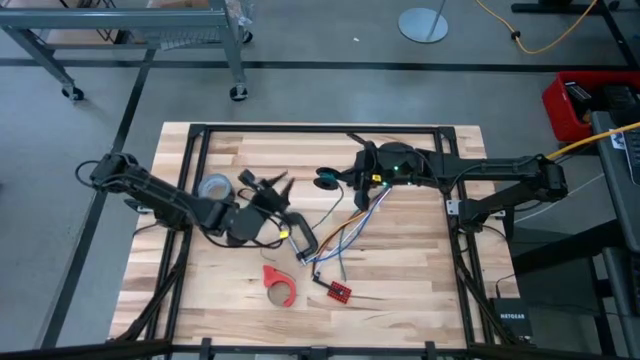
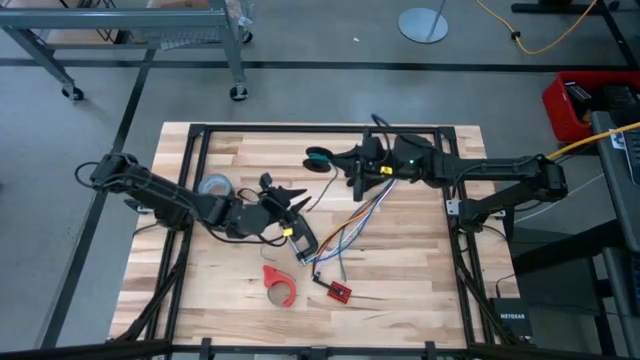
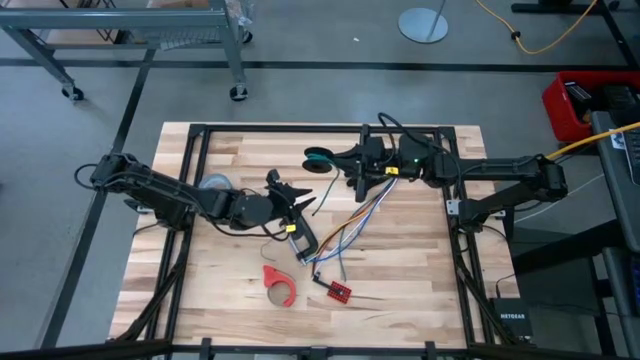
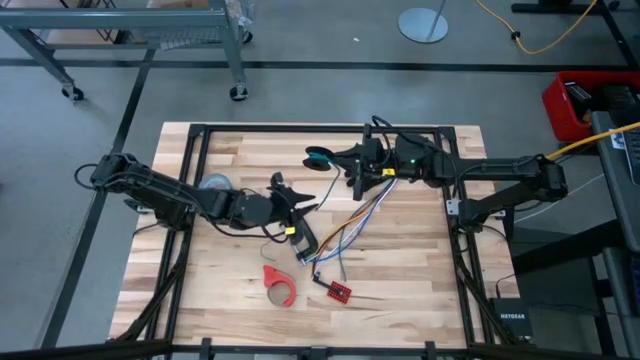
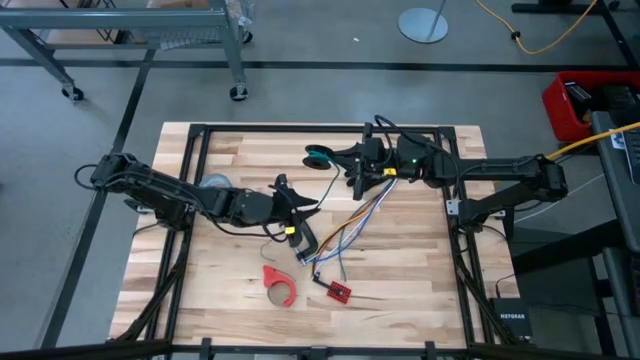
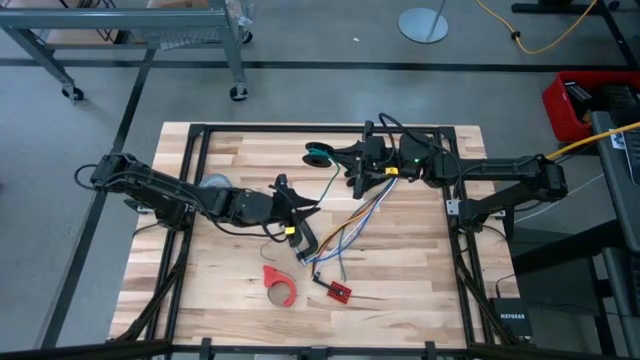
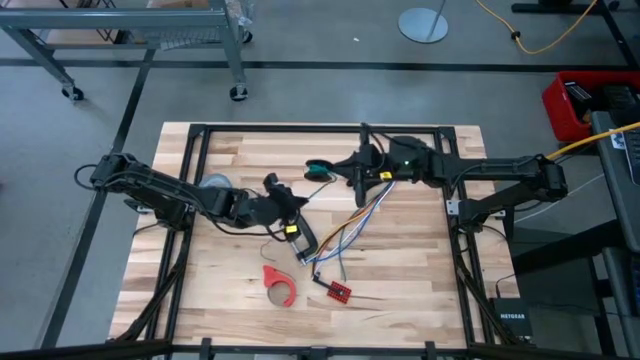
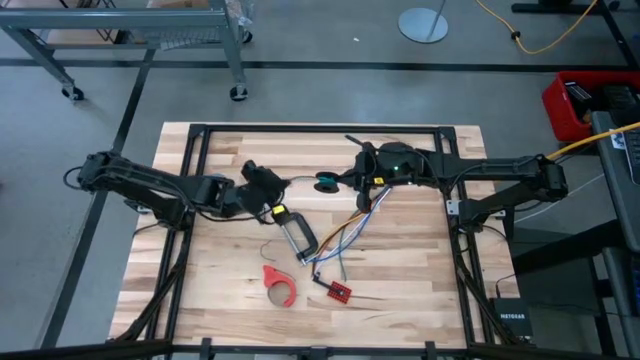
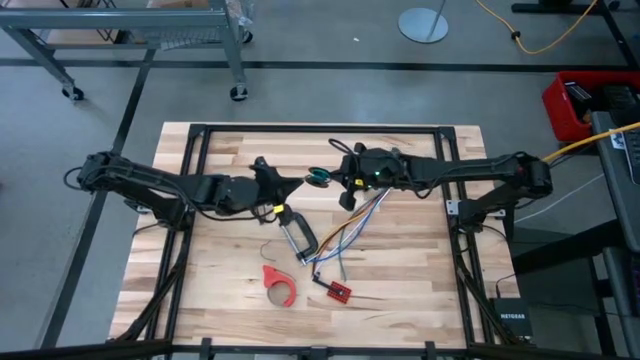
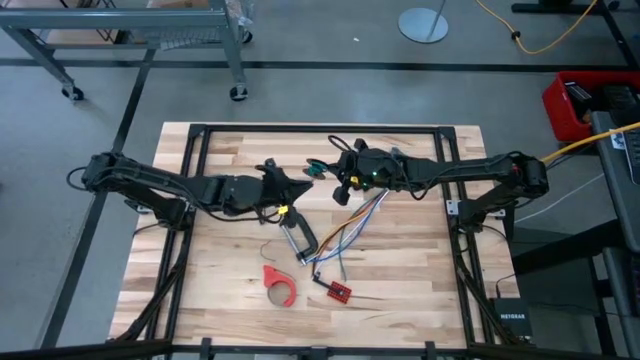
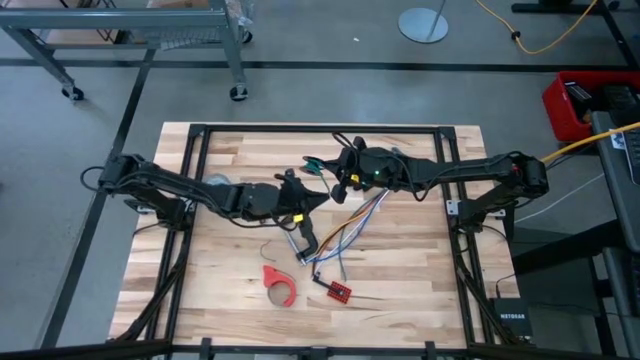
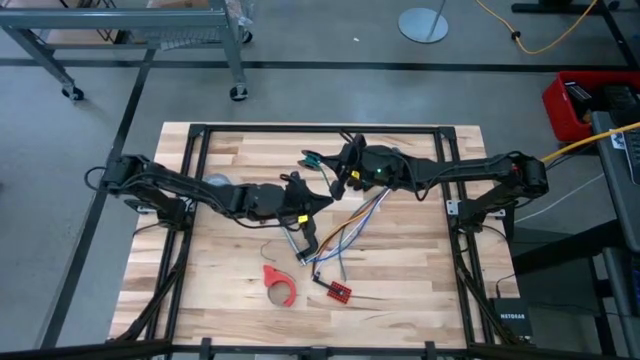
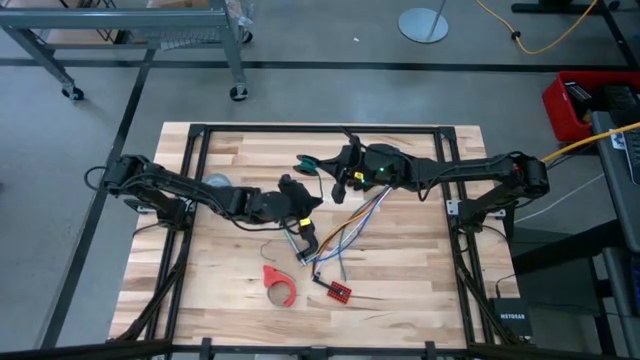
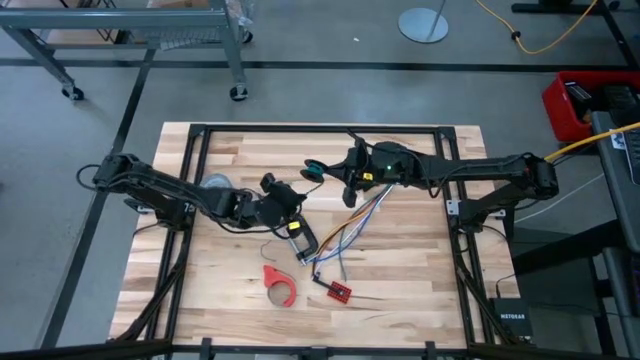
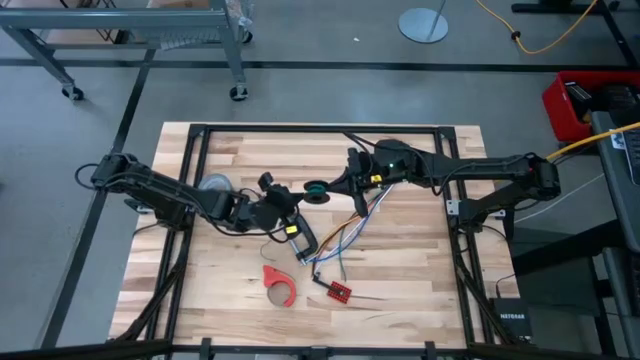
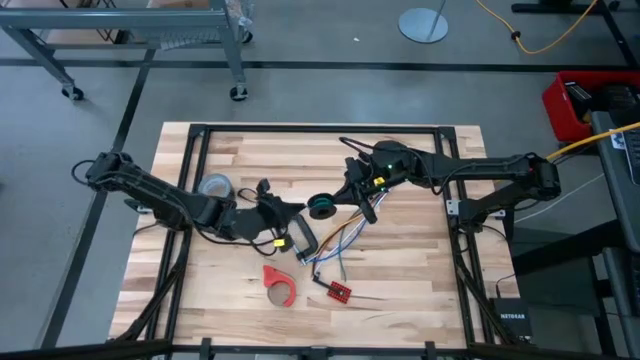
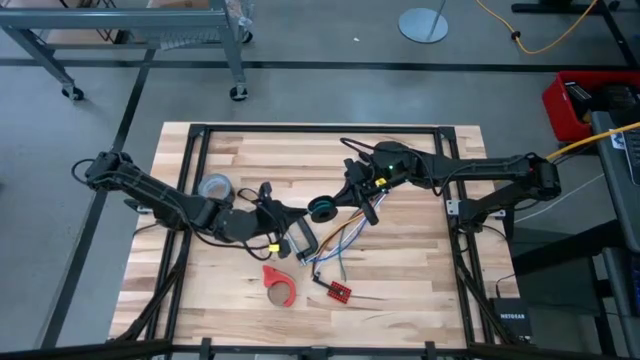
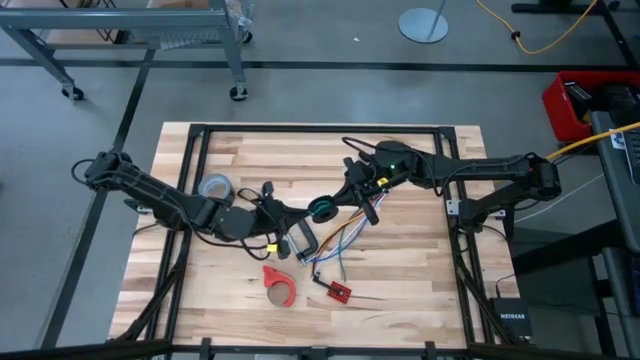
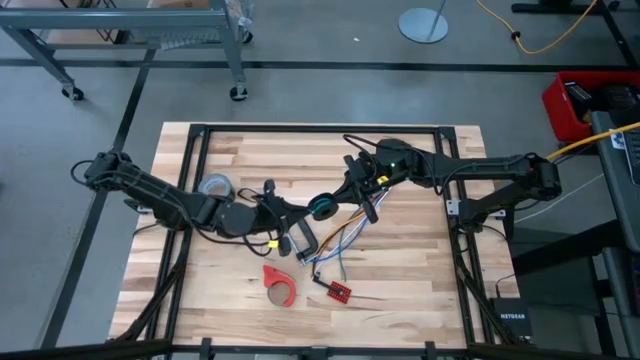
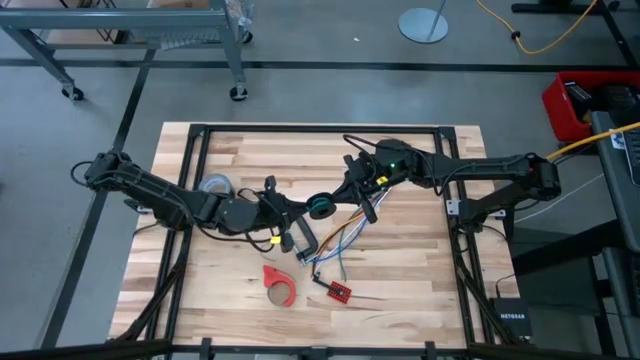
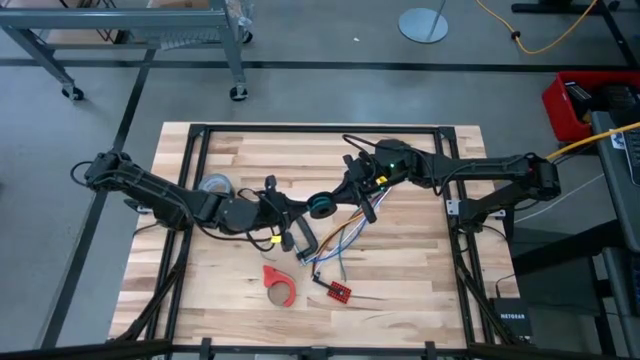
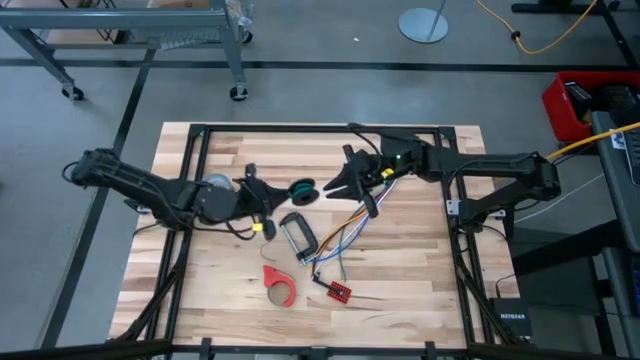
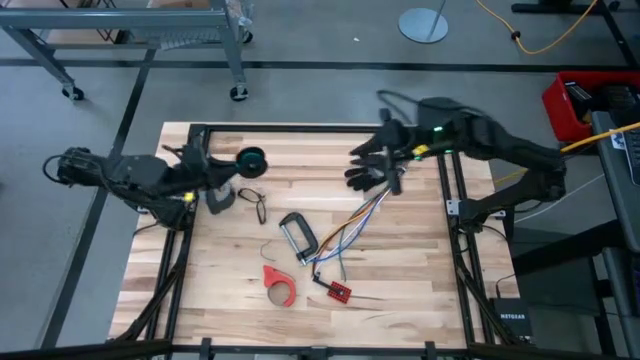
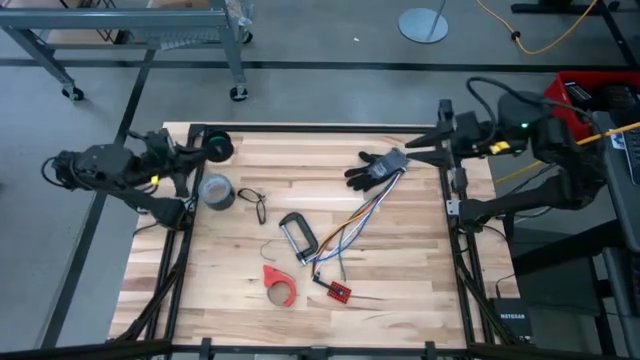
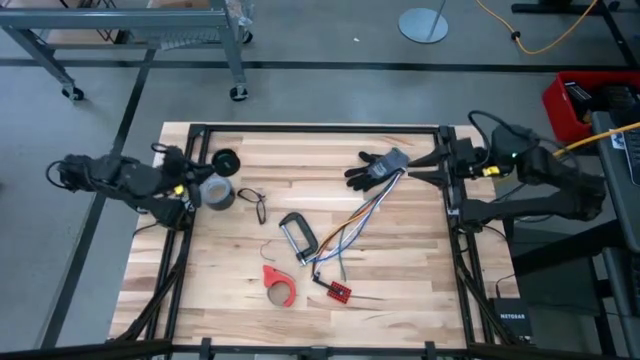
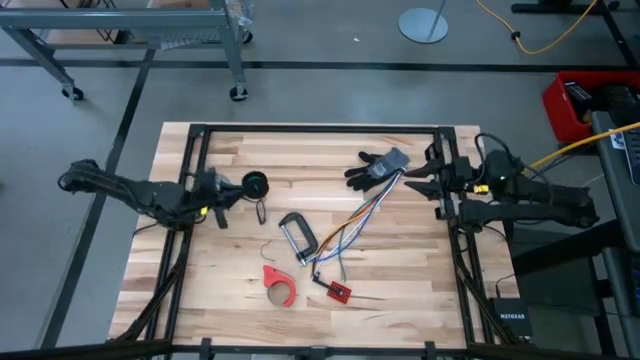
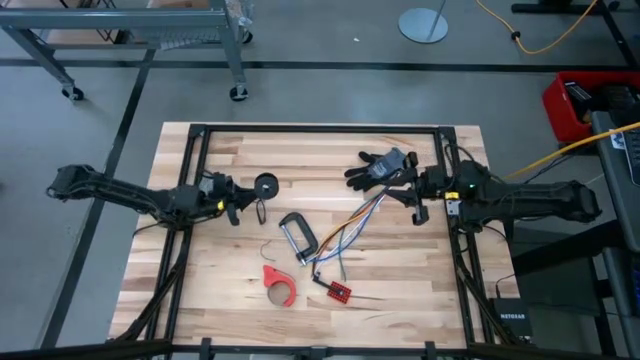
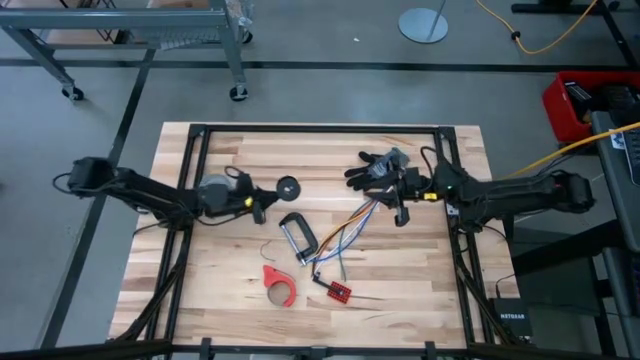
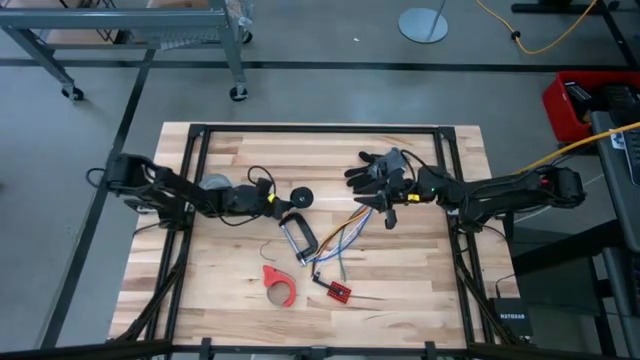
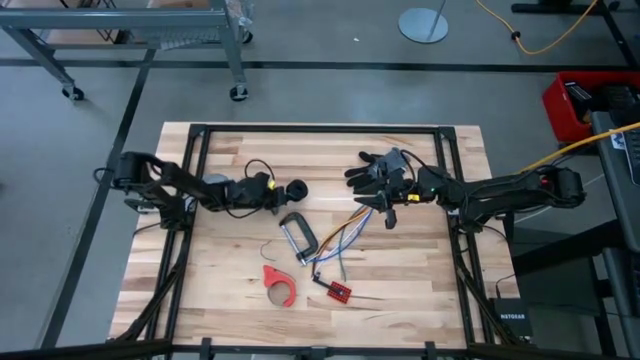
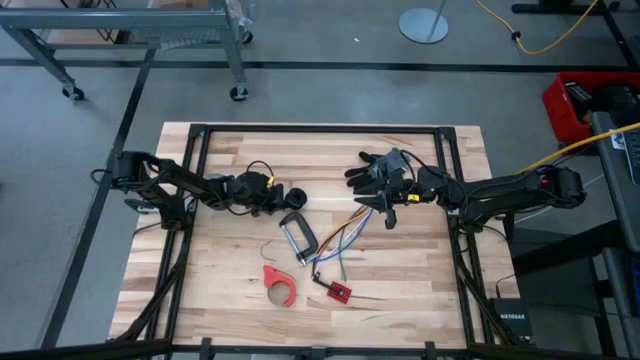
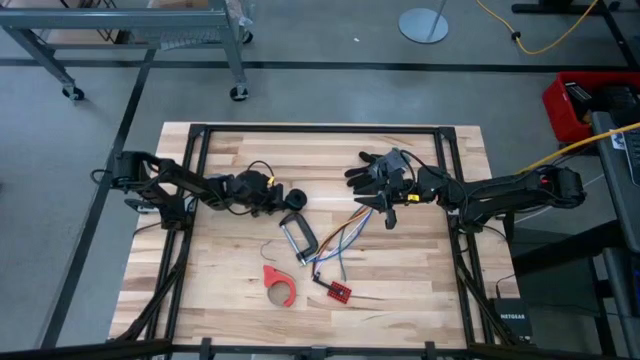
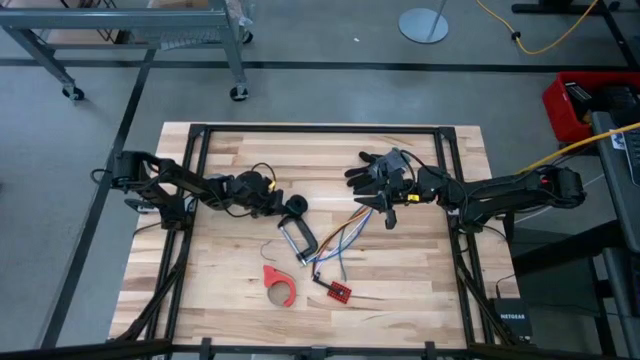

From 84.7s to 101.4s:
Task: Coil cords
Coil the green wire around the spool

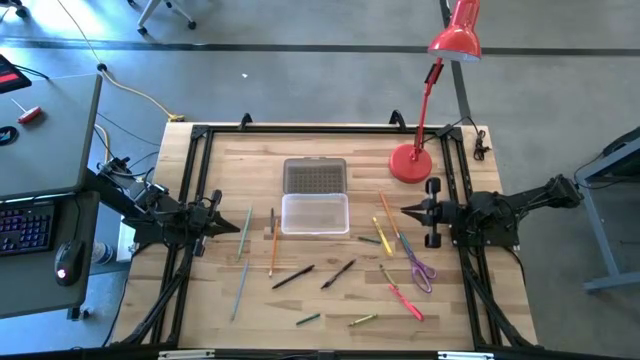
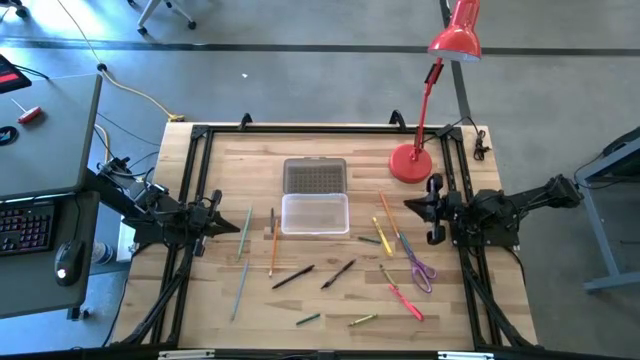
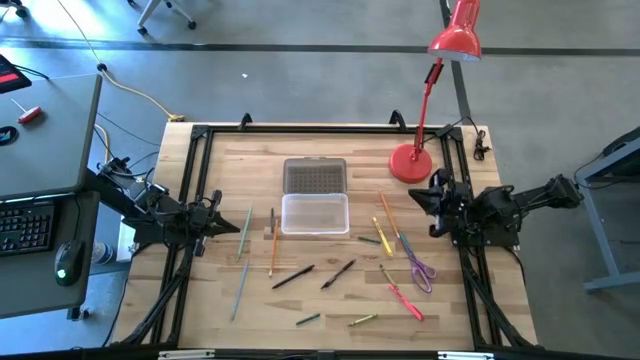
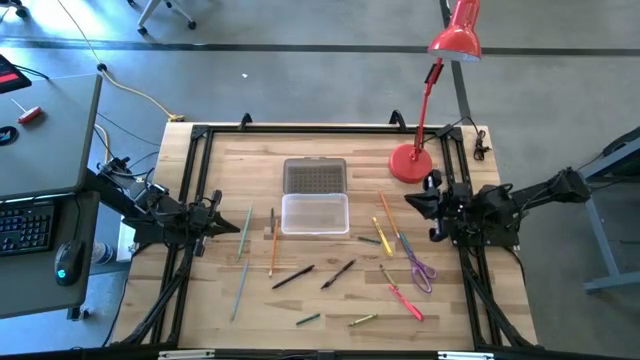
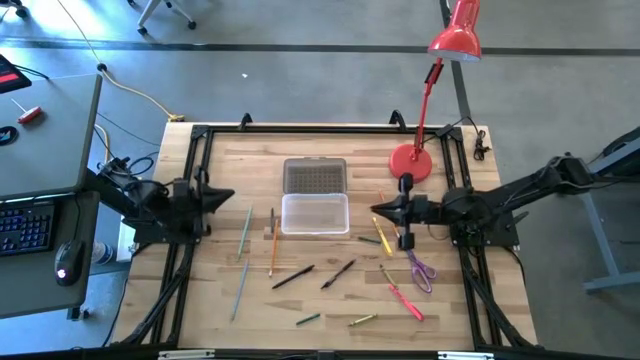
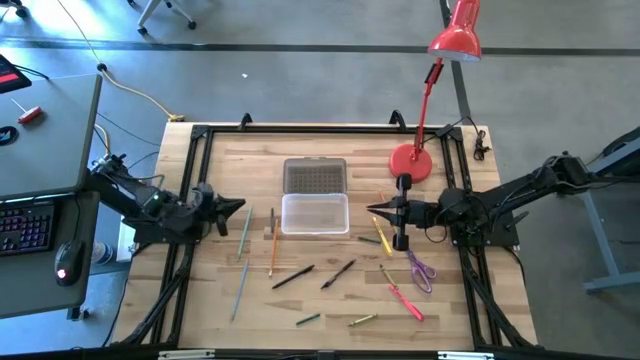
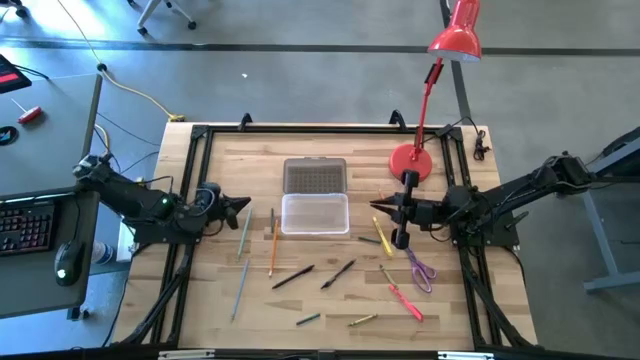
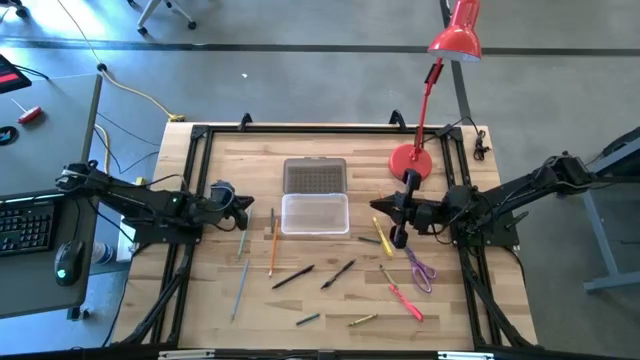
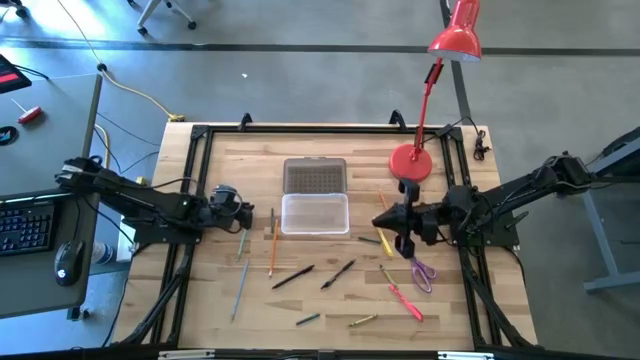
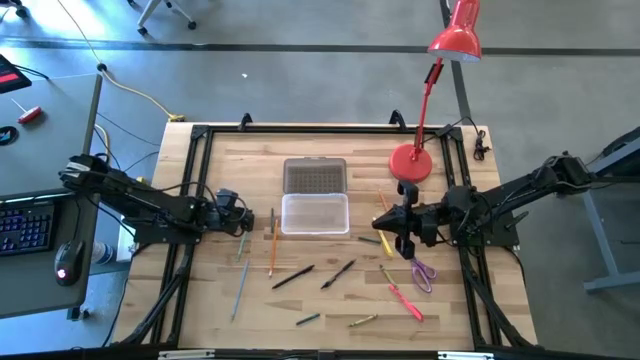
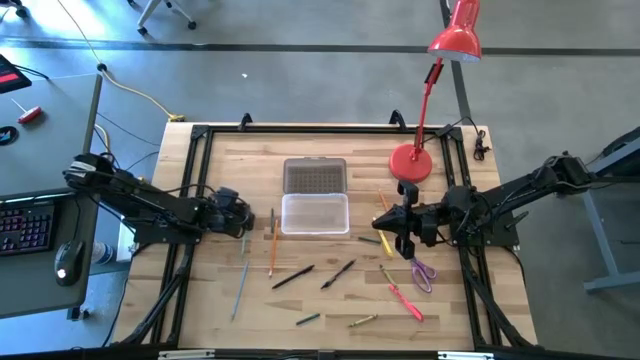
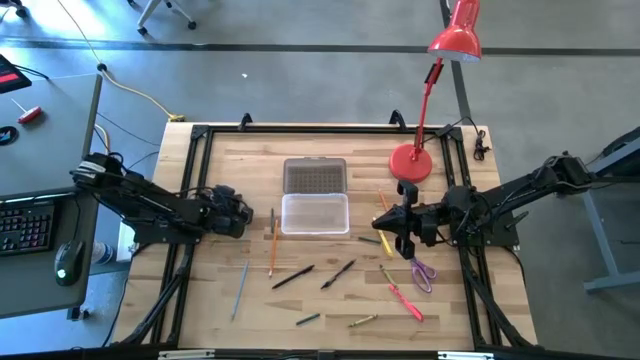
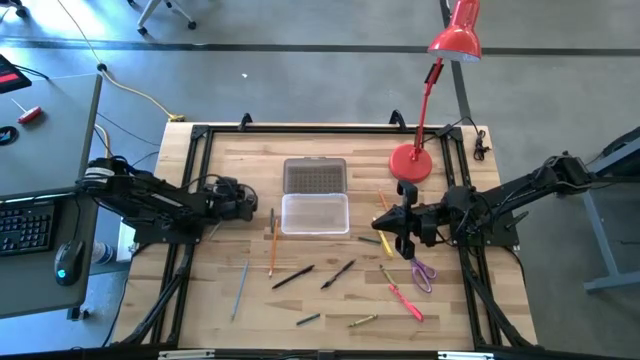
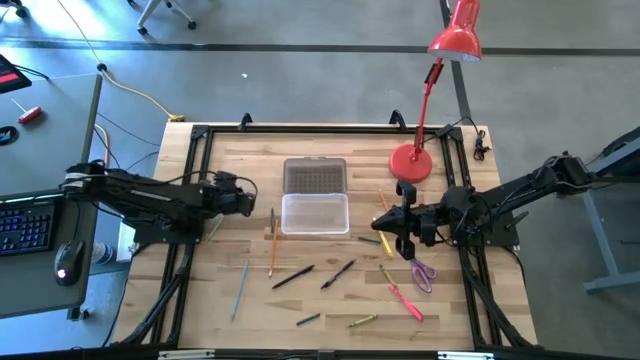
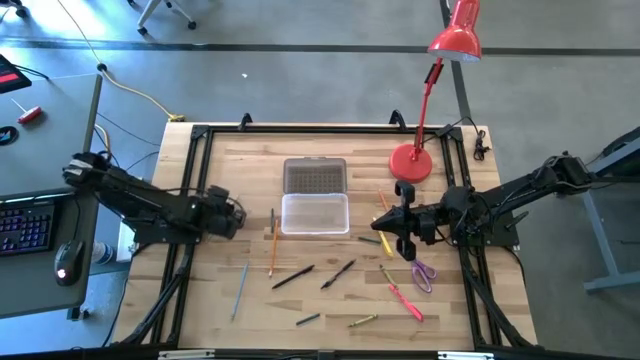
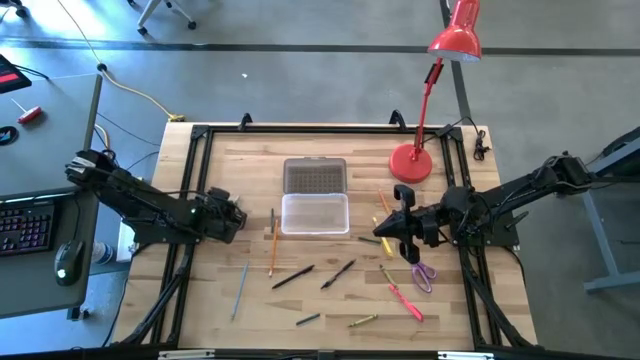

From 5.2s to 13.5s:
Task: Pick & place school supplies into a supply box
Put the top light blue pencil into the supply box
